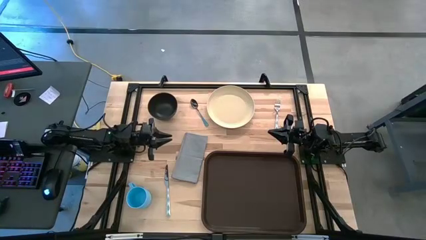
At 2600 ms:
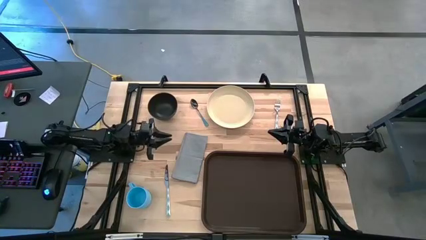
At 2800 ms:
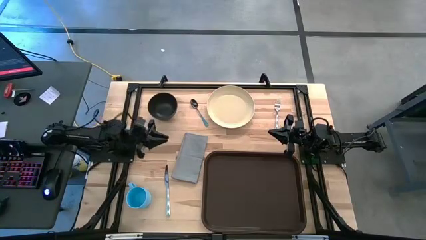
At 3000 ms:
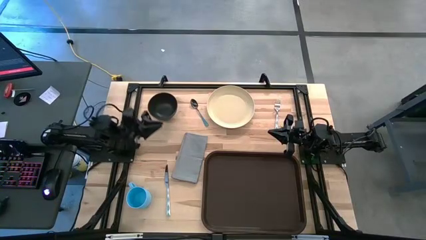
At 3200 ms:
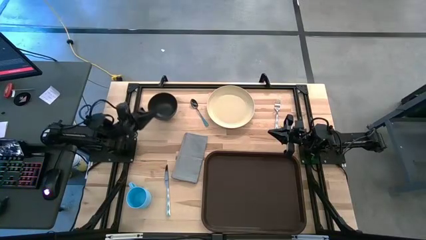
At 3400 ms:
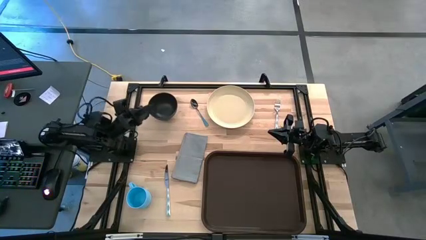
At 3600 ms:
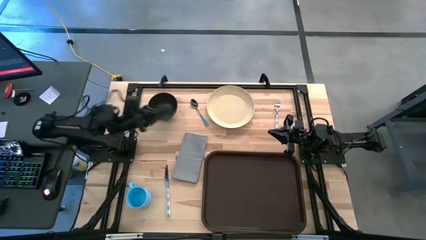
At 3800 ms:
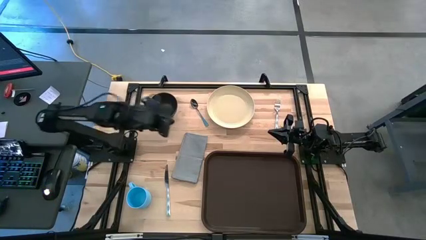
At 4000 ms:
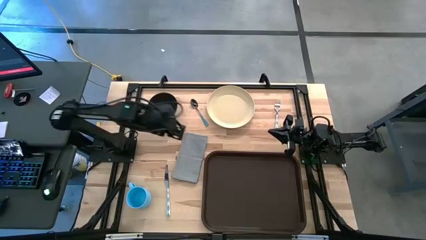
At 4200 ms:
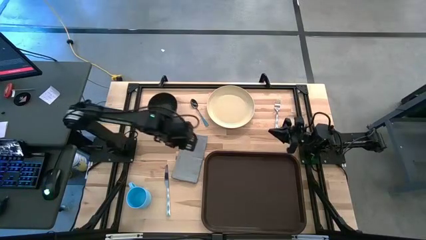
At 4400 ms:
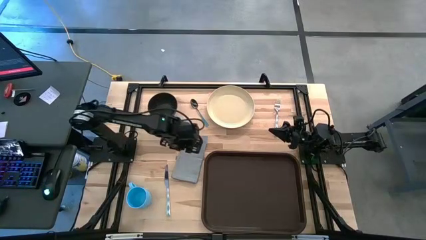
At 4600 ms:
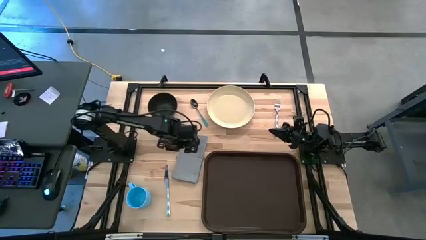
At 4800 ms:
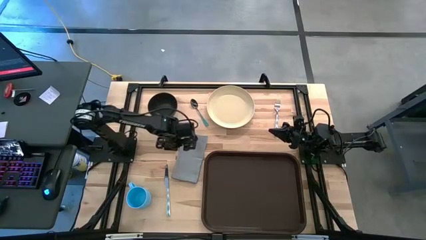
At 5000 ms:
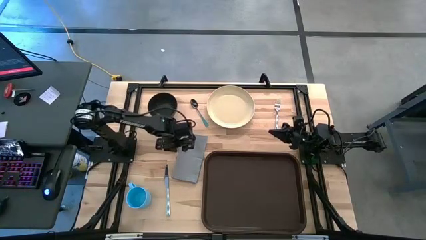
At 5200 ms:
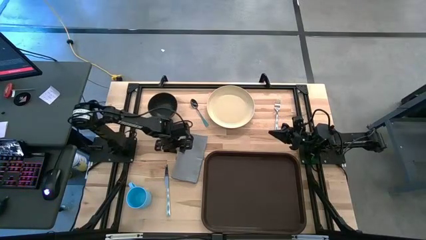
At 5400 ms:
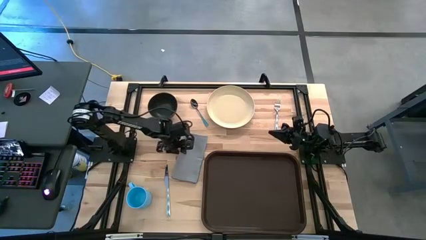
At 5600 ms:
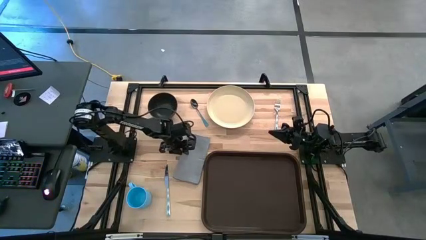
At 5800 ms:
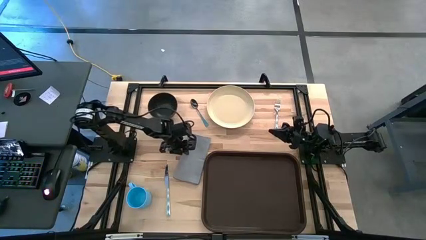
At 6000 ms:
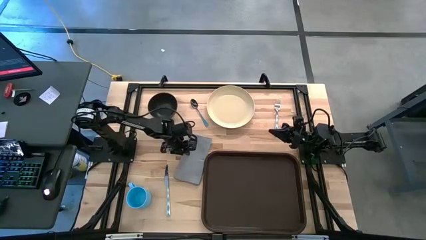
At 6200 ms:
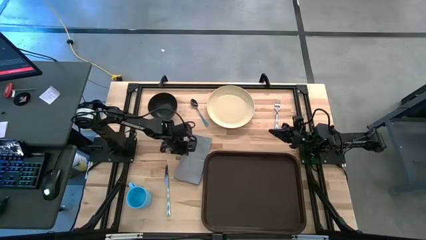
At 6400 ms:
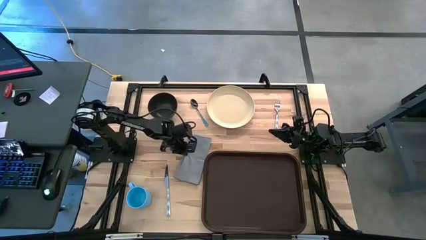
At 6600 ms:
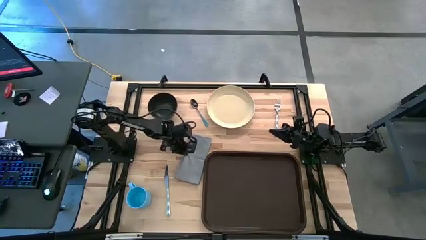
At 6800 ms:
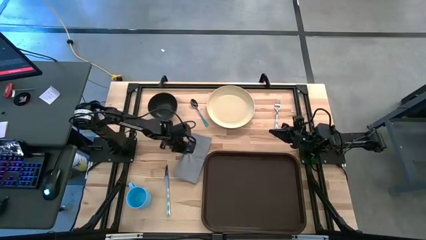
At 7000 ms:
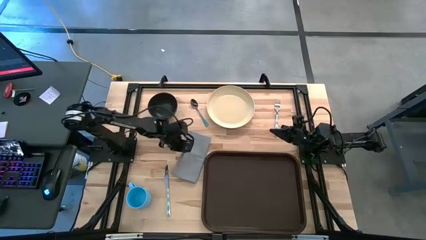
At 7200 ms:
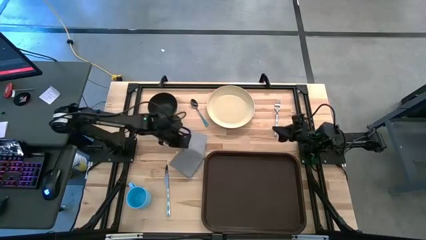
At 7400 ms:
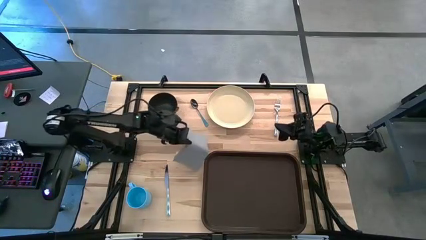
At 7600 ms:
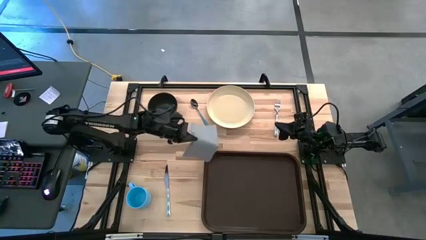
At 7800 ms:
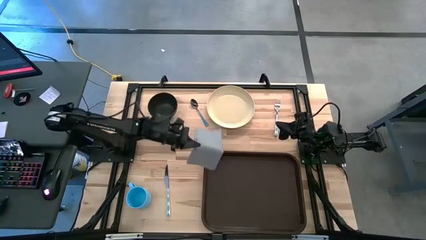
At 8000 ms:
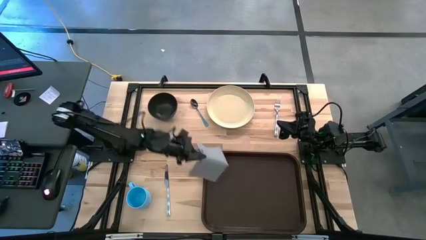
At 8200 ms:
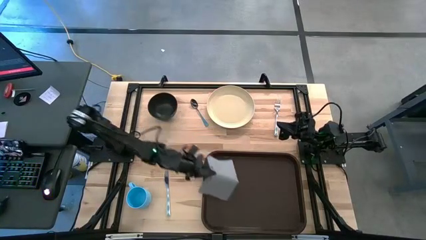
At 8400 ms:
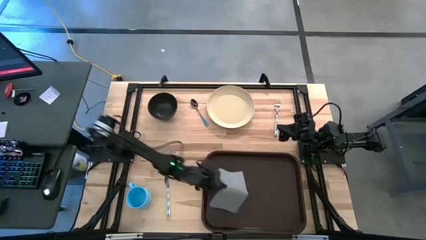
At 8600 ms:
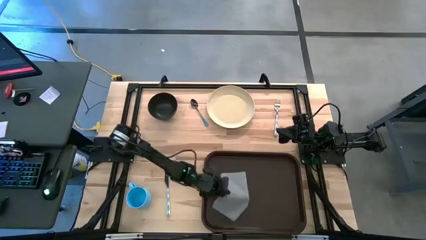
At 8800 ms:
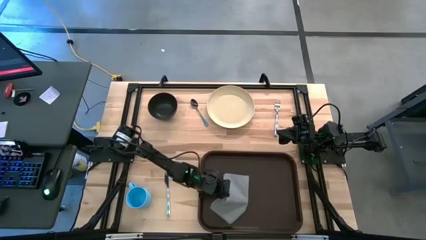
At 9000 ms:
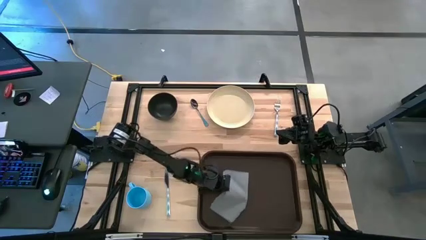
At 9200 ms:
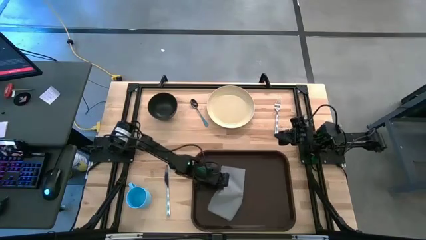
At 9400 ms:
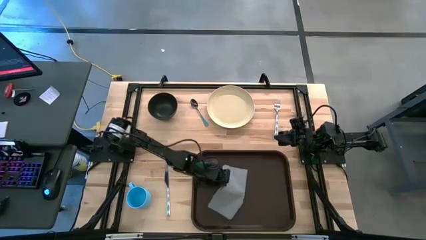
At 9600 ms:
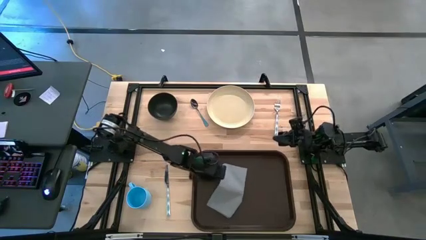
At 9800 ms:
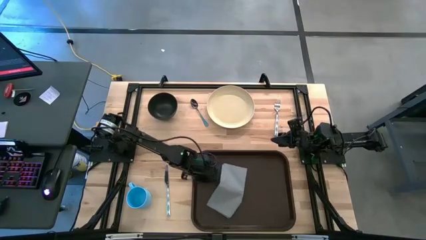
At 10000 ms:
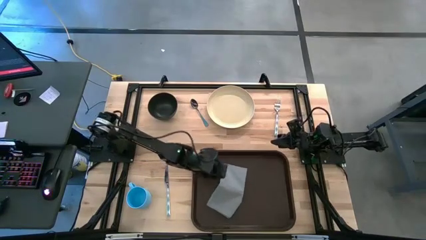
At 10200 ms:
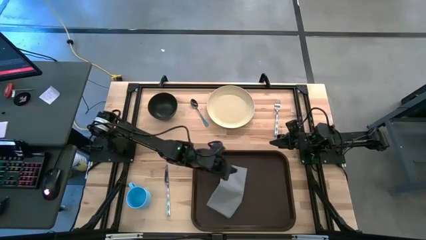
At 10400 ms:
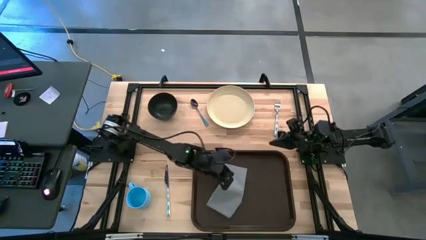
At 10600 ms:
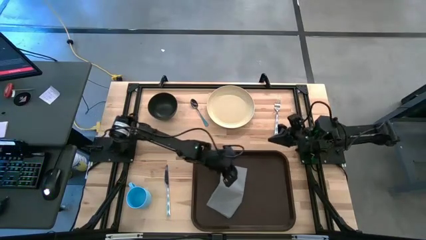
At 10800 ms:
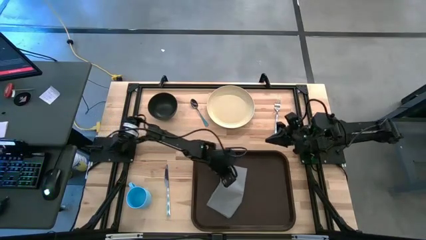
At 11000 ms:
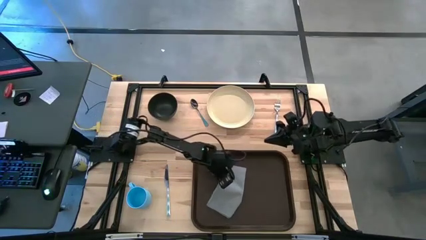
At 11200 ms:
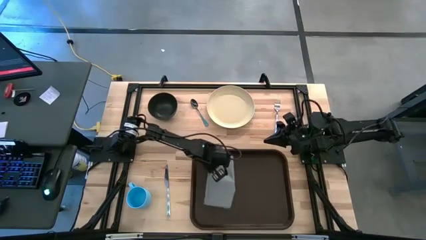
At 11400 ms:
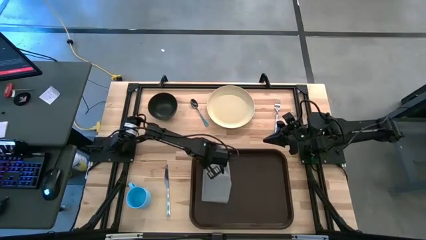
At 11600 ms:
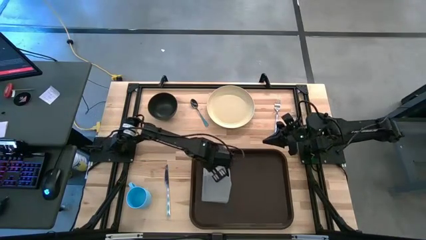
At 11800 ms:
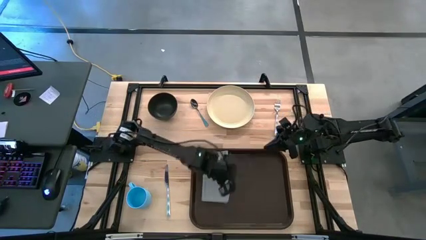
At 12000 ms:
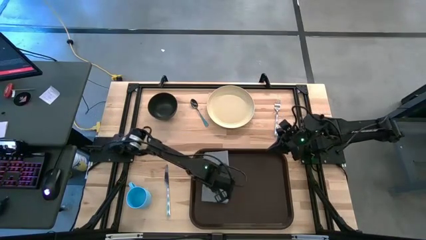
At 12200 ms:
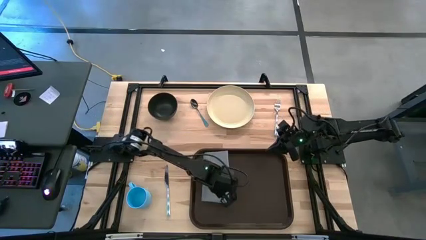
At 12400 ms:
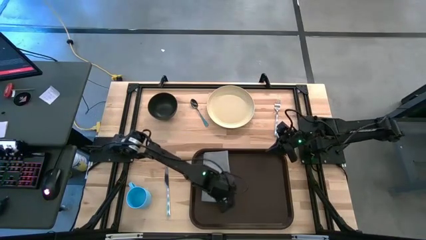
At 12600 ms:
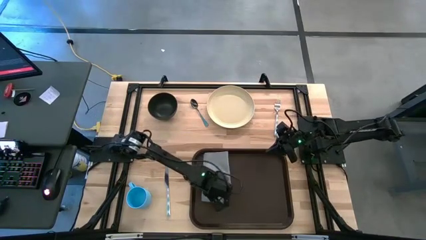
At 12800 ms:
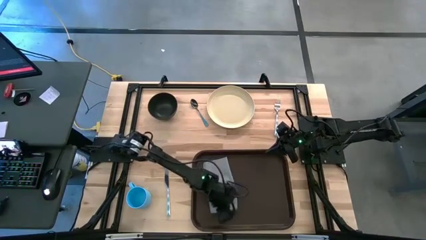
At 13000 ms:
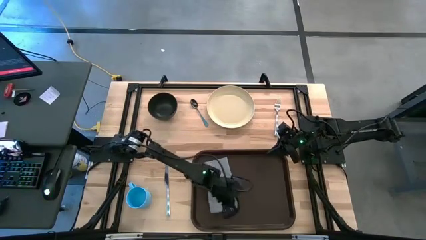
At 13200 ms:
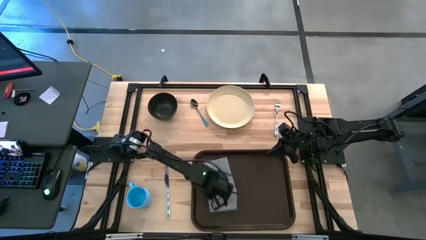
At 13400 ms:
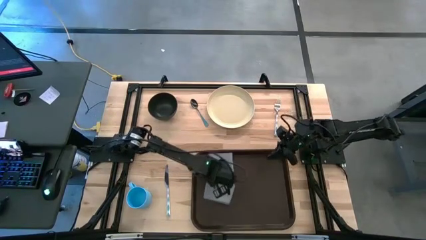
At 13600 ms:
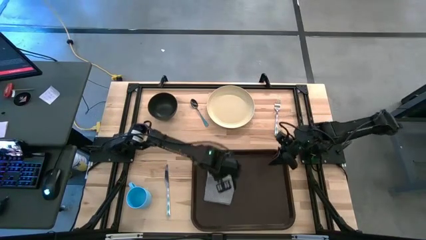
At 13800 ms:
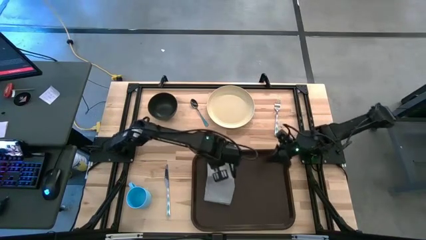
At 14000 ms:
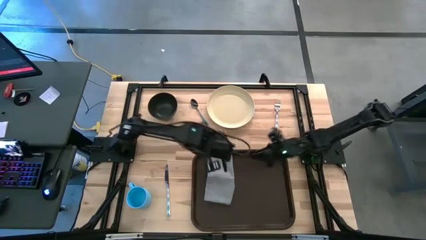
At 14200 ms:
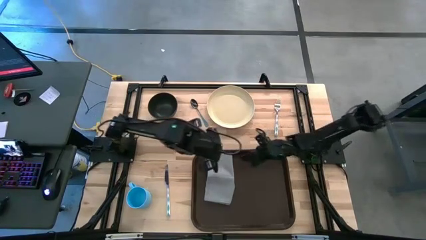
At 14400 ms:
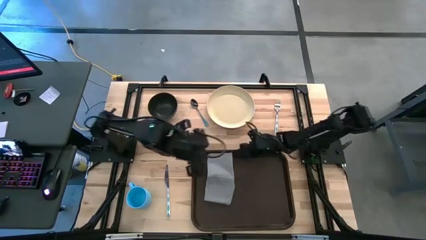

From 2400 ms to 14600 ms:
Task: Set up tray
Put the gray table napkin on the brown tray
